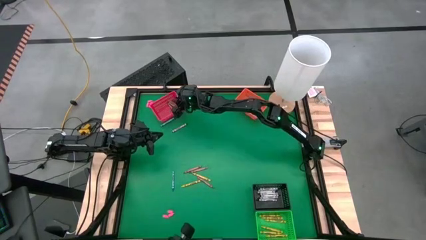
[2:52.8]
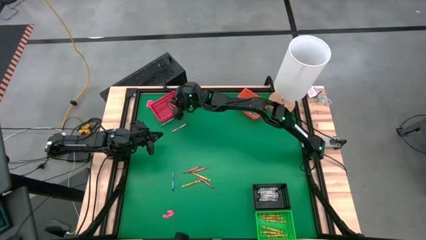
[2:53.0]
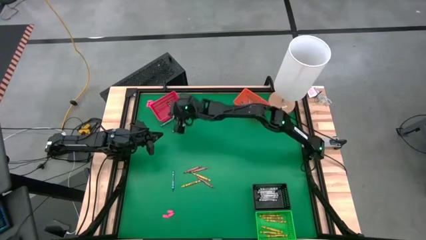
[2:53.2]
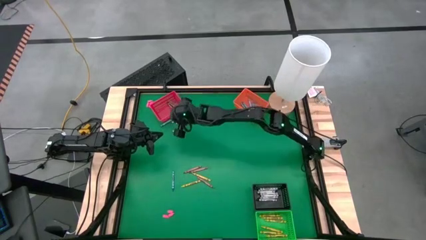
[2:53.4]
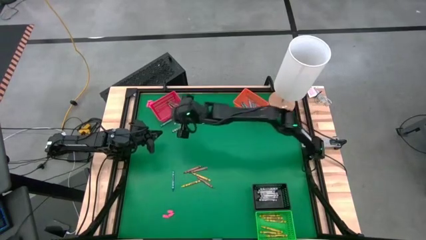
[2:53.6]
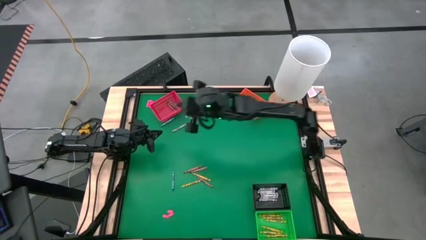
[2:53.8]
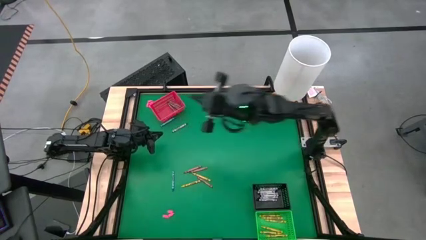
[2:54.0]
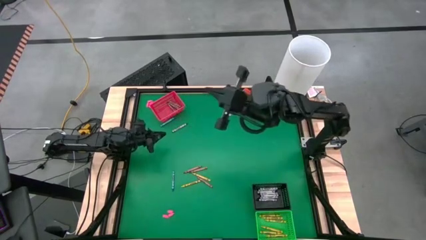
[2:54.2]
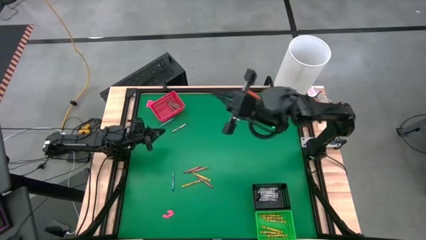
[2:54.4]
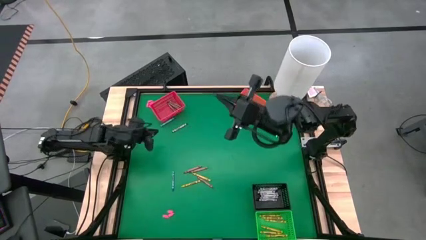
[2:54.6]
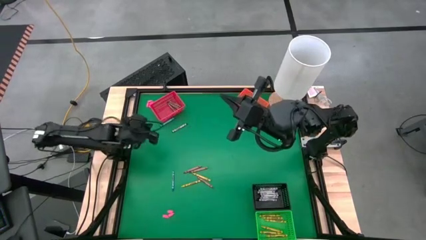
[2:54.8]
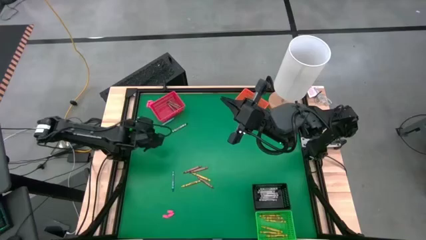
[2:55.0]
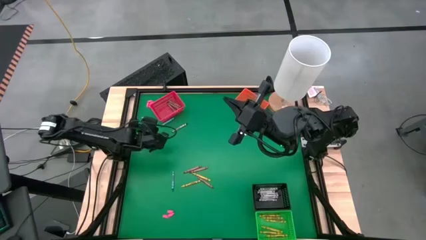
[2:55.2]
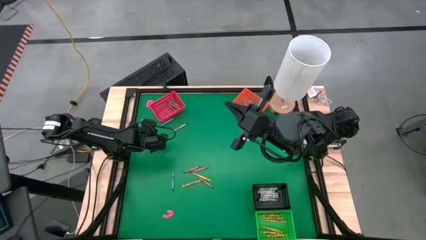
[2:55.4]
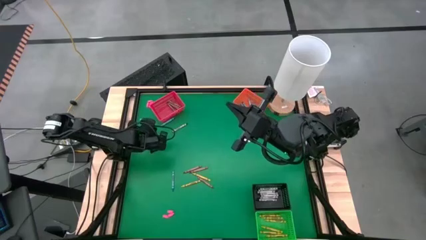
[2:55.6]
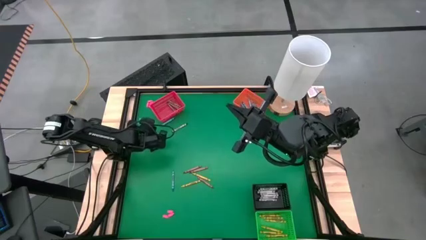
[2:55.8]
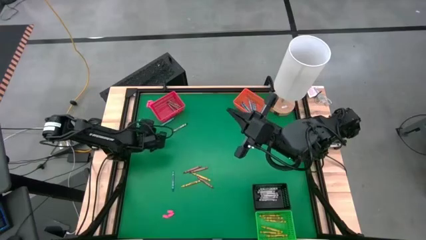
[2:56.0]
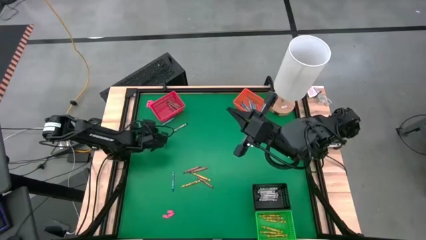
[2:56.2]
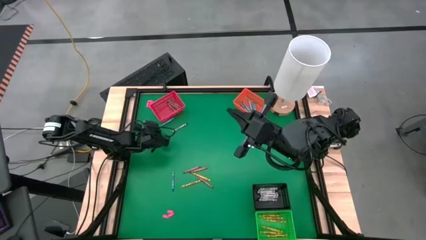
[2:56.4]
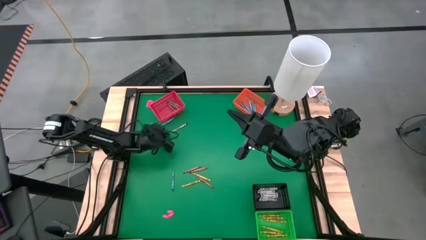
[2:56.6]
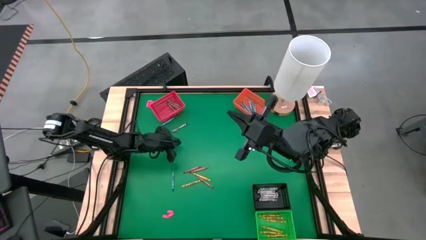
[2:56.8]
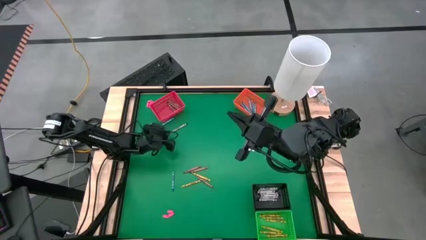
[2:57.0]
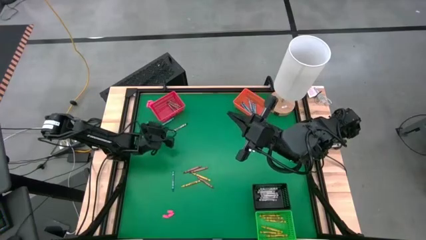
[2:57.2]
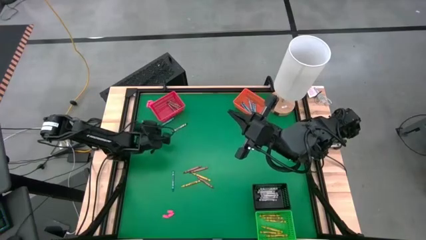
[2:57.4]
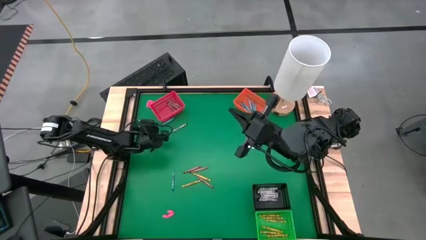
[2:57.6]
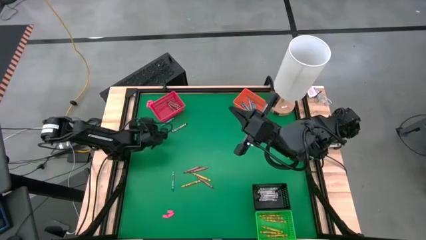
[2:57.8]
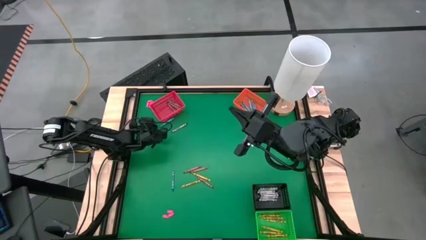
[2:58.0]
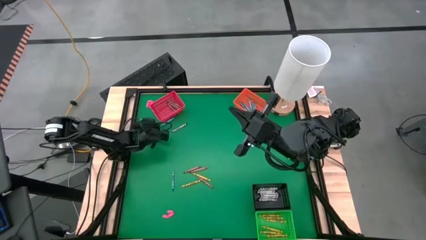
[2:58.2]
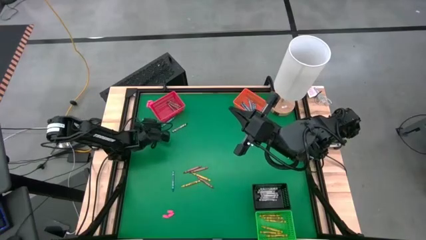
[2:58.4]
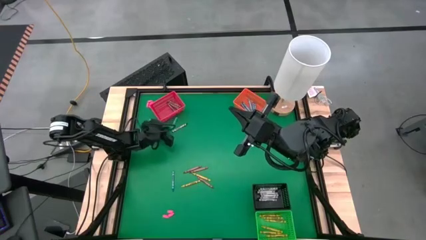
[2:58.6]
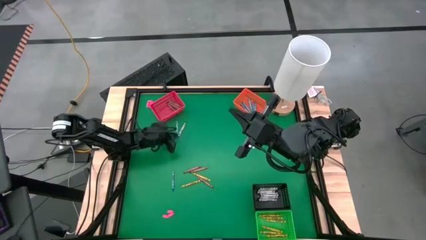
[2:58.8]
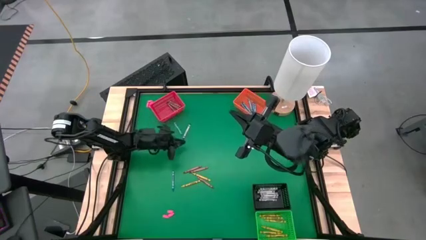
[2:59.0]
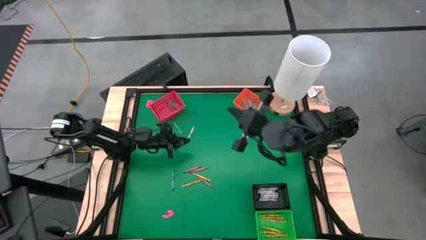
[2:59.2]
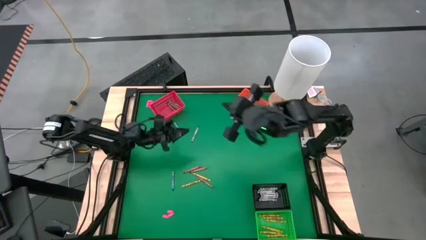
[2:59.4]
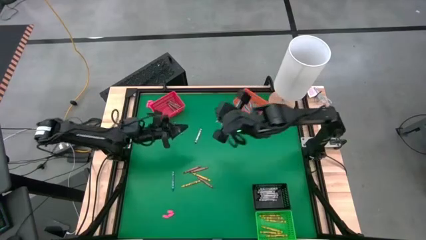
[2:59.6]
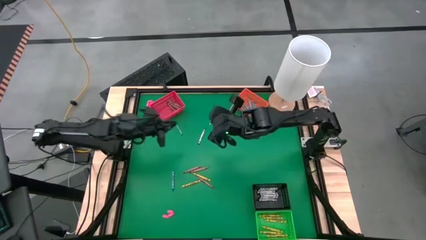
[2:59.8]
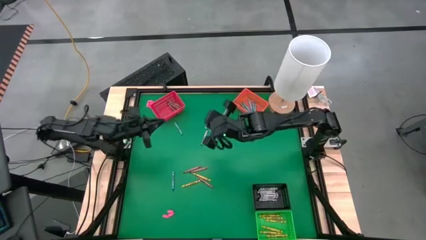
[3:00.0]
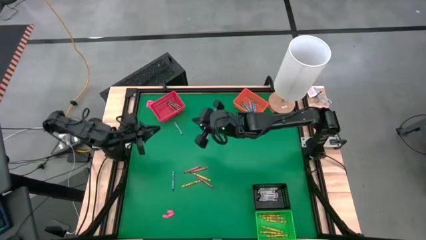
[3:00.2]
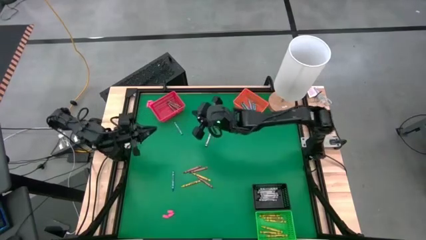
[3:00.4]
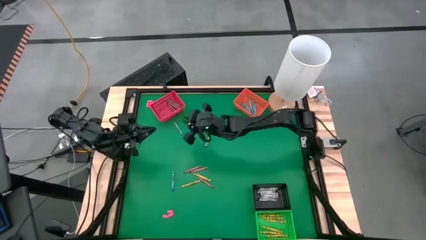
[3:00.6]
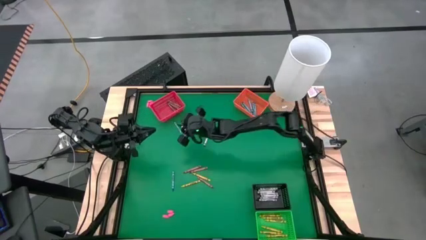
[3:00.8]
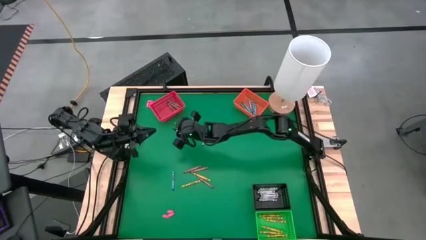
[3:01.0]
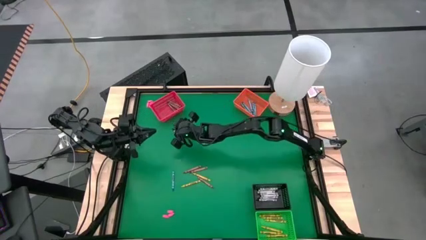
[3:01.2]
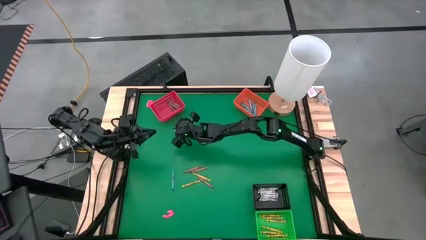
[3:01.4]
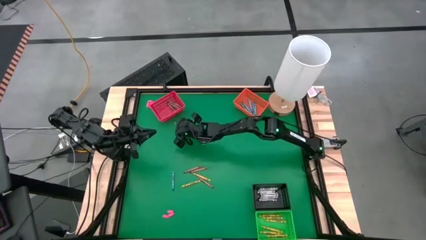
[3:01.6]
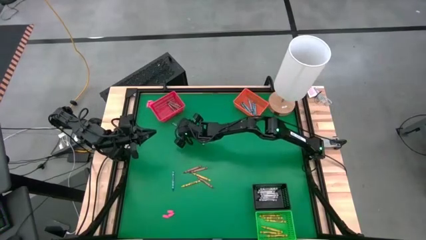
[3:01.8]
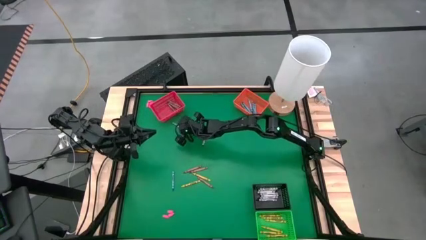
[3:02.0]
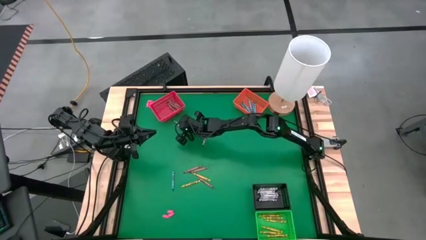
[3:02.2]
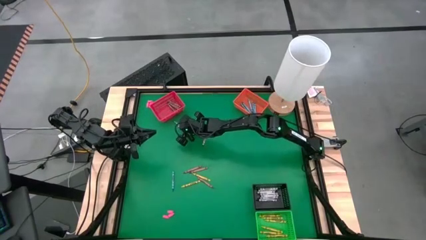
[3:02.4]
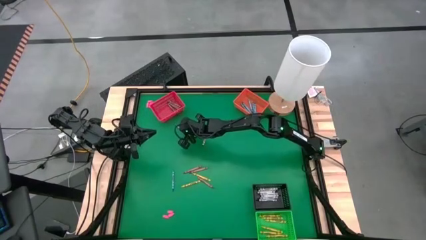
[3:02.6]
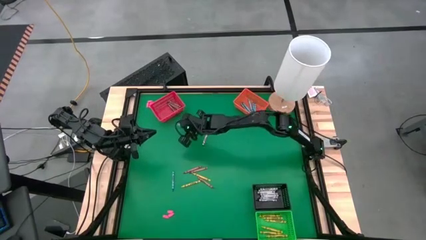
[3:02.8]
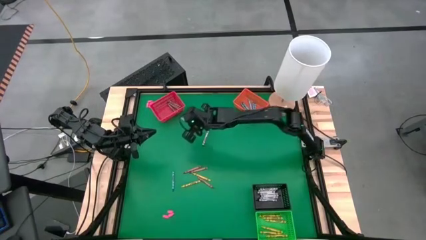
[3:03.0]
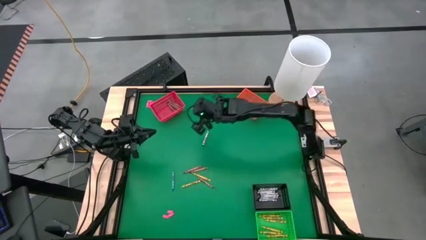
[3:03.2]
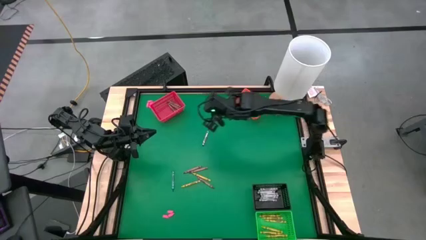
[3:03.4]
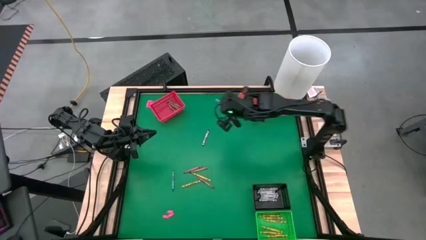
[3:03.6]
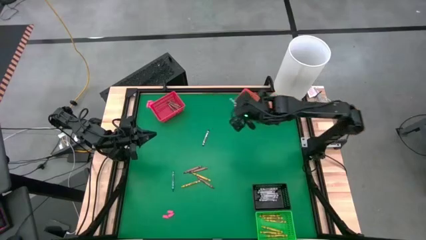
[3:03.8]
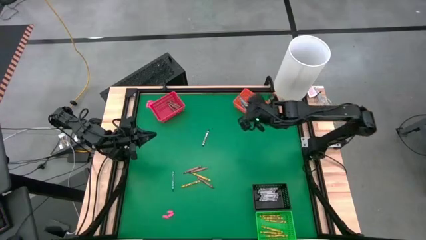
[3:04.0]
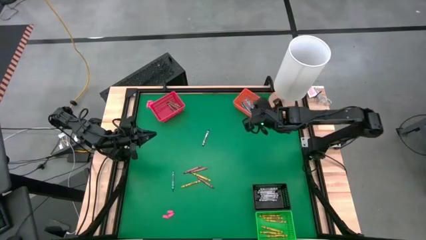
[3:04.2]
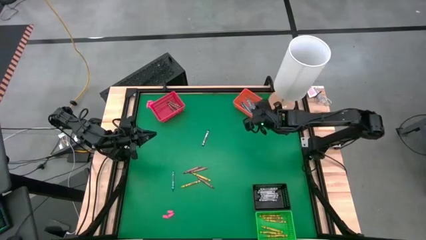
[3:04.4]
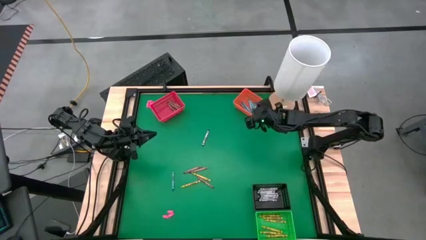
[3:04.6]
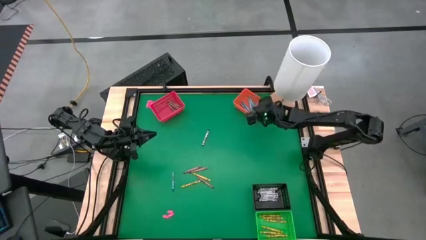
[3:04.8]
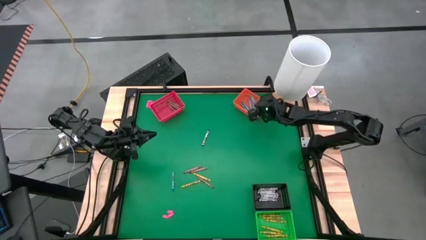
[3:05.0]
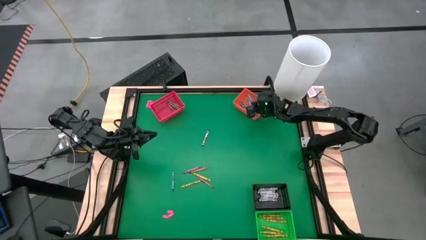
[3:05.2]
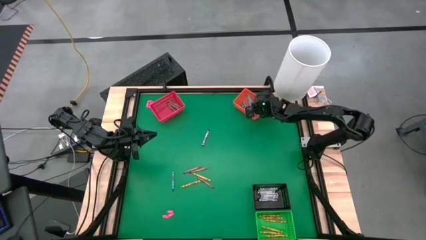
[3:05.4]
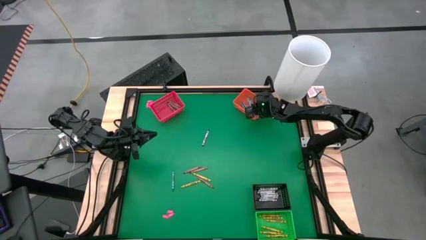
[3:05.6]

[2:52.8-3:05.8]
Task: Sort crayons
Put the blue crayon into the orange bin
